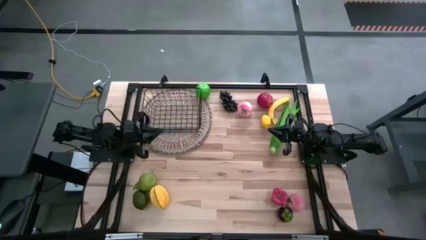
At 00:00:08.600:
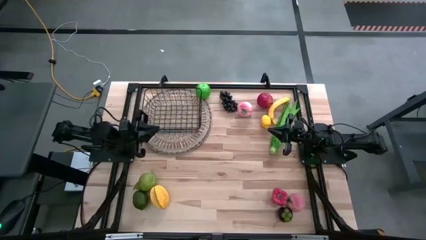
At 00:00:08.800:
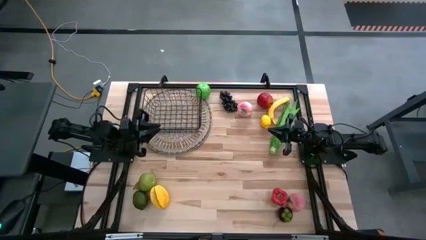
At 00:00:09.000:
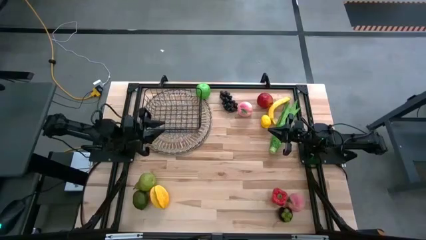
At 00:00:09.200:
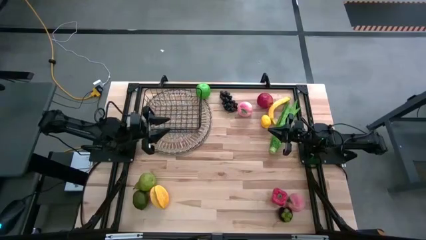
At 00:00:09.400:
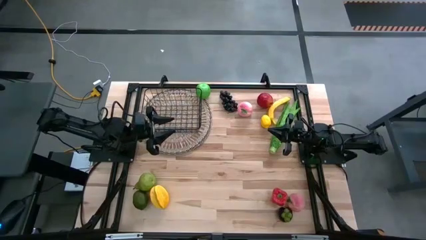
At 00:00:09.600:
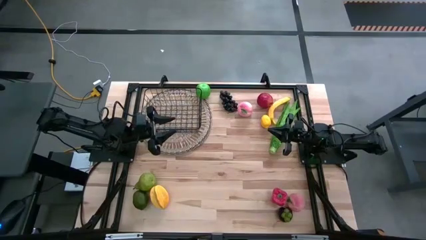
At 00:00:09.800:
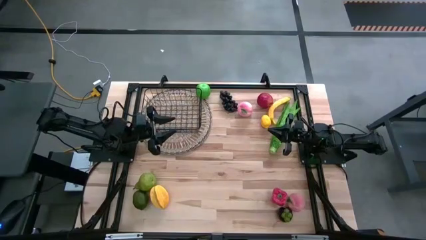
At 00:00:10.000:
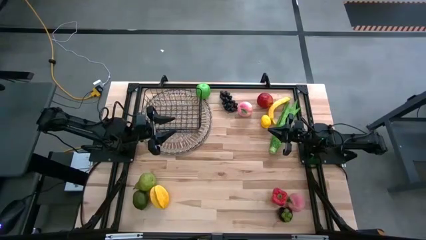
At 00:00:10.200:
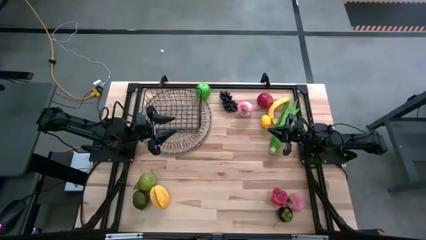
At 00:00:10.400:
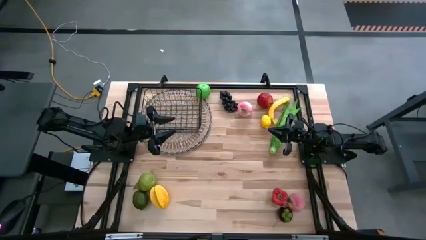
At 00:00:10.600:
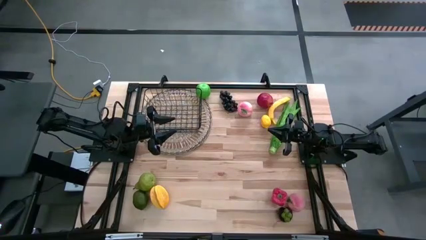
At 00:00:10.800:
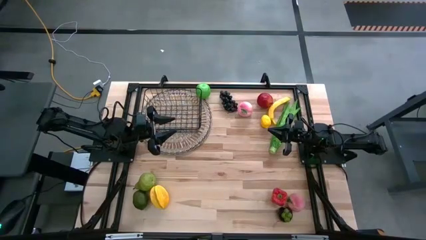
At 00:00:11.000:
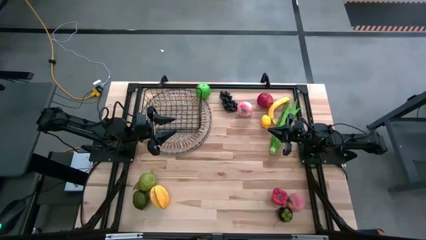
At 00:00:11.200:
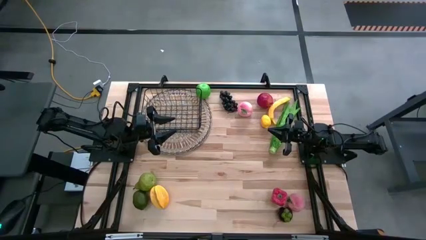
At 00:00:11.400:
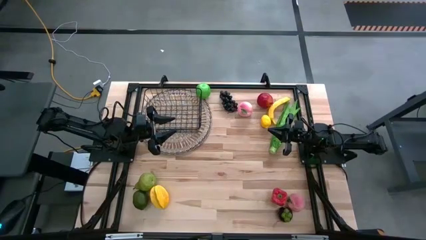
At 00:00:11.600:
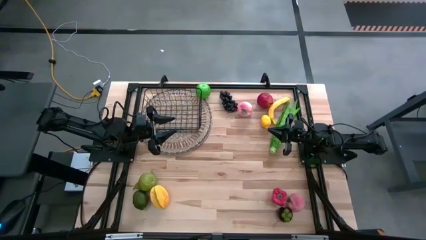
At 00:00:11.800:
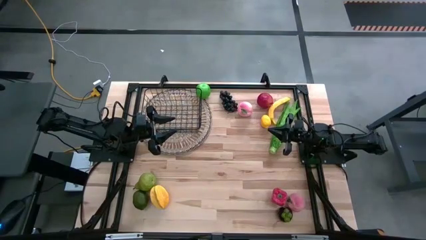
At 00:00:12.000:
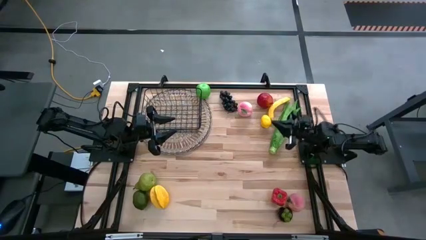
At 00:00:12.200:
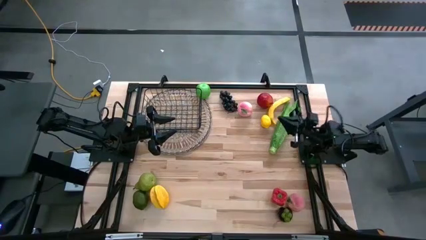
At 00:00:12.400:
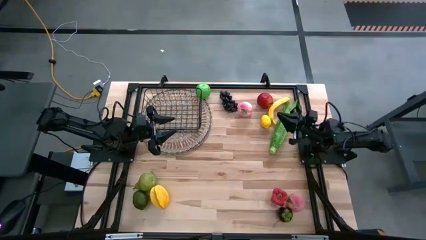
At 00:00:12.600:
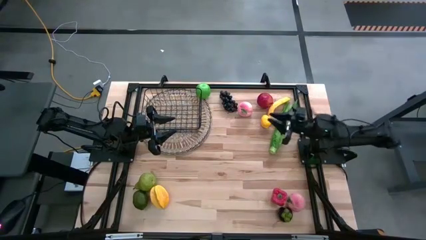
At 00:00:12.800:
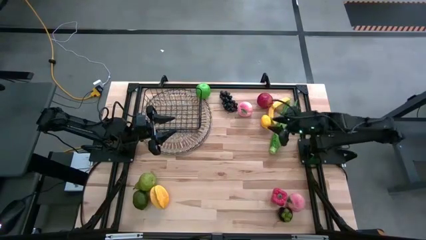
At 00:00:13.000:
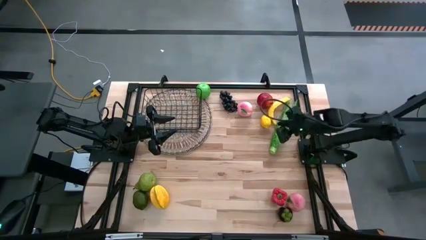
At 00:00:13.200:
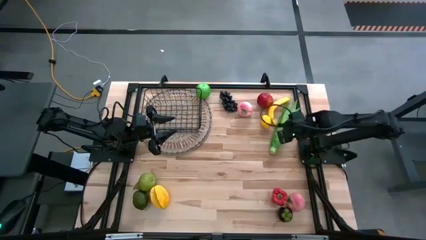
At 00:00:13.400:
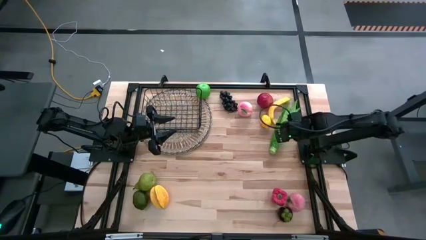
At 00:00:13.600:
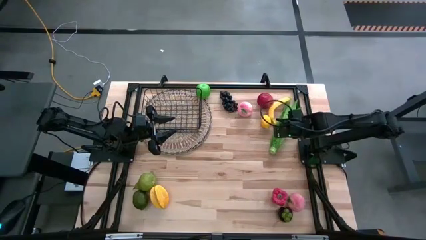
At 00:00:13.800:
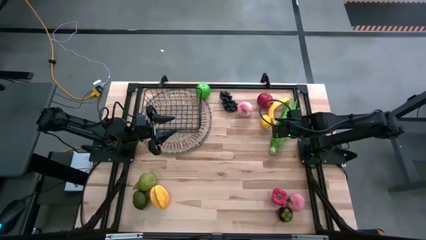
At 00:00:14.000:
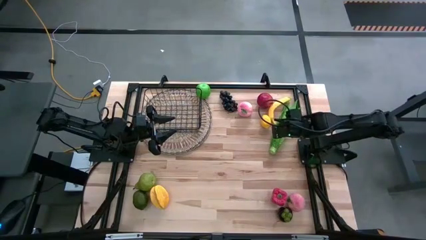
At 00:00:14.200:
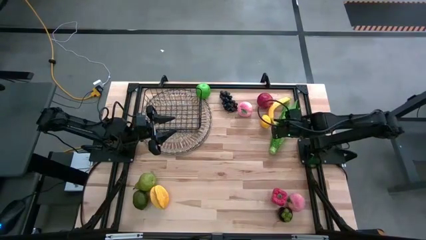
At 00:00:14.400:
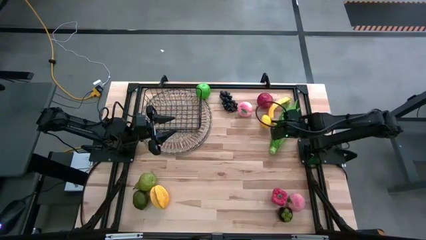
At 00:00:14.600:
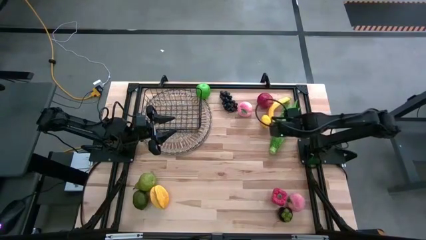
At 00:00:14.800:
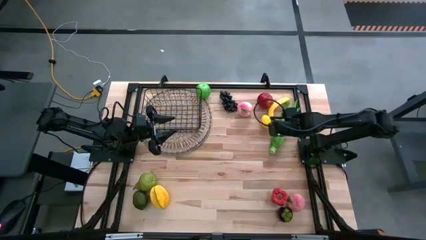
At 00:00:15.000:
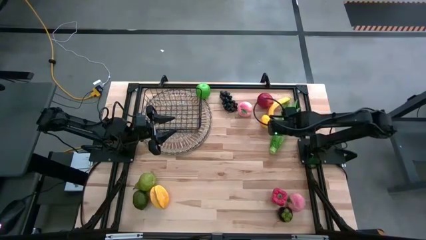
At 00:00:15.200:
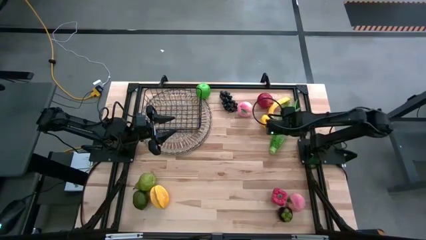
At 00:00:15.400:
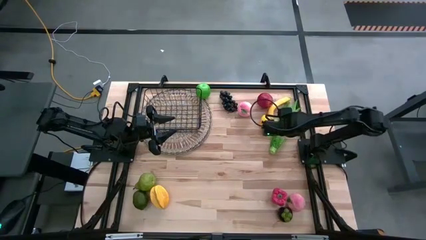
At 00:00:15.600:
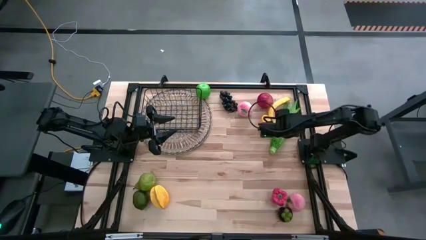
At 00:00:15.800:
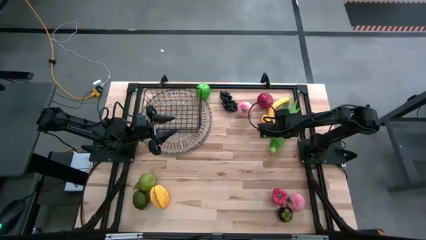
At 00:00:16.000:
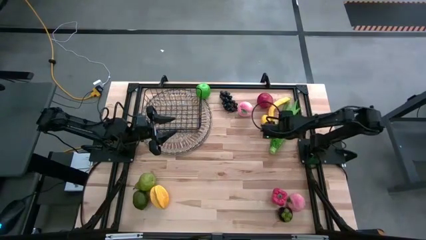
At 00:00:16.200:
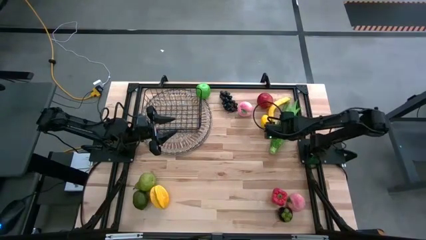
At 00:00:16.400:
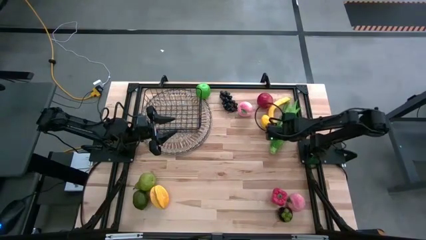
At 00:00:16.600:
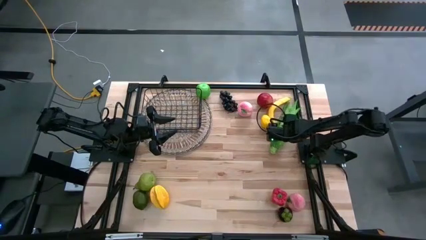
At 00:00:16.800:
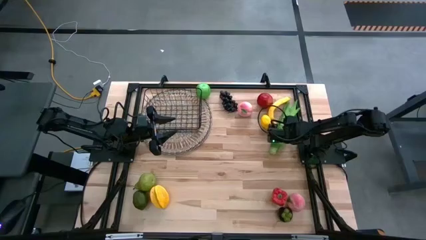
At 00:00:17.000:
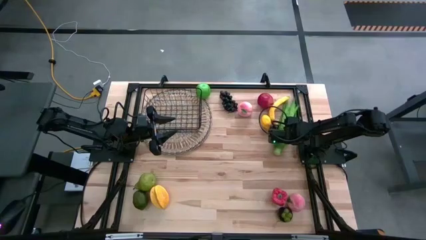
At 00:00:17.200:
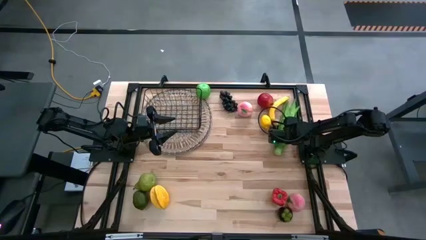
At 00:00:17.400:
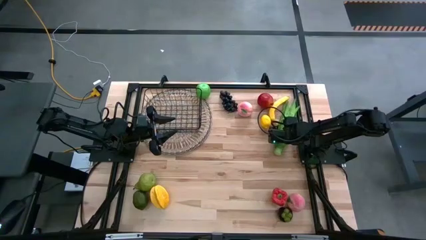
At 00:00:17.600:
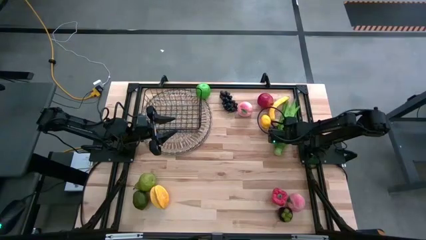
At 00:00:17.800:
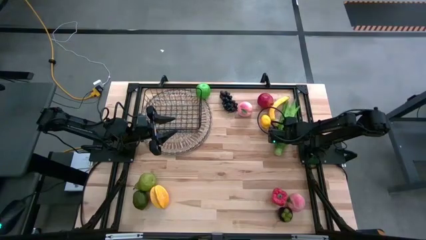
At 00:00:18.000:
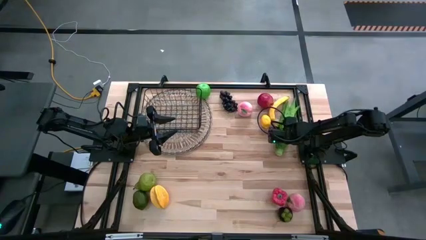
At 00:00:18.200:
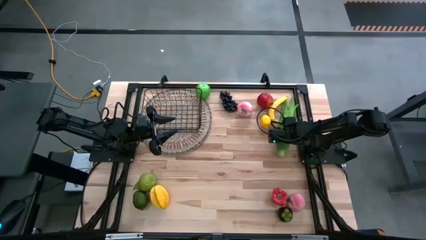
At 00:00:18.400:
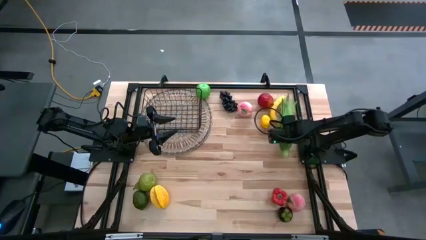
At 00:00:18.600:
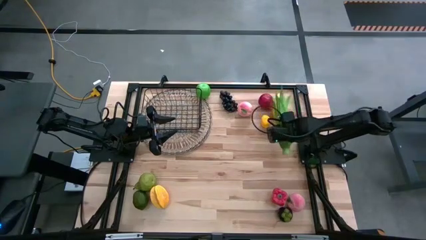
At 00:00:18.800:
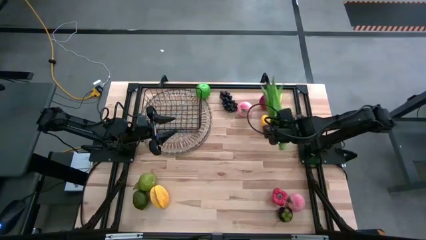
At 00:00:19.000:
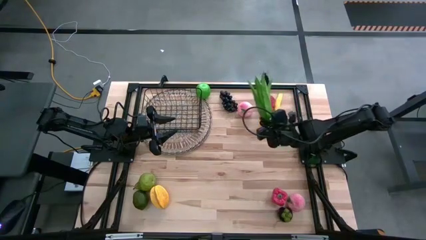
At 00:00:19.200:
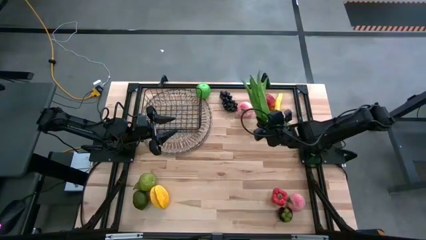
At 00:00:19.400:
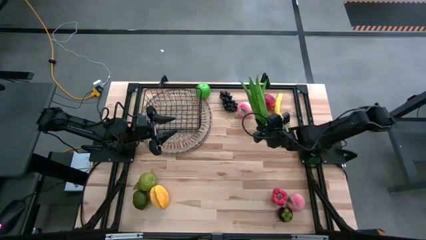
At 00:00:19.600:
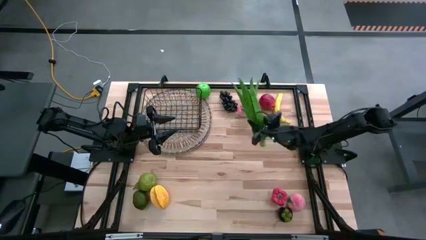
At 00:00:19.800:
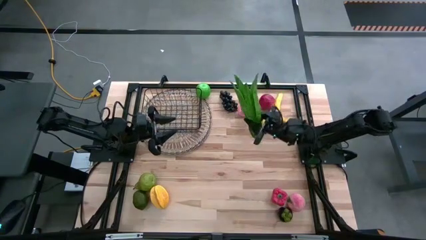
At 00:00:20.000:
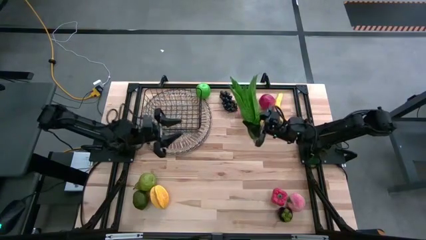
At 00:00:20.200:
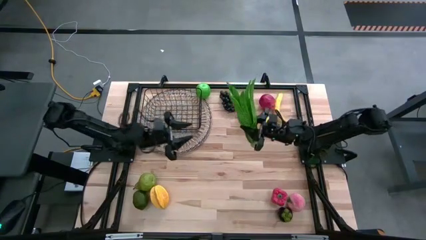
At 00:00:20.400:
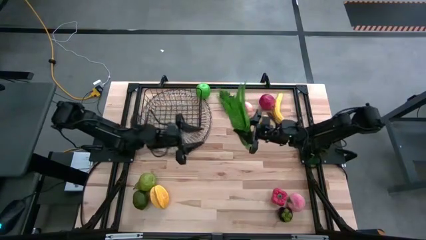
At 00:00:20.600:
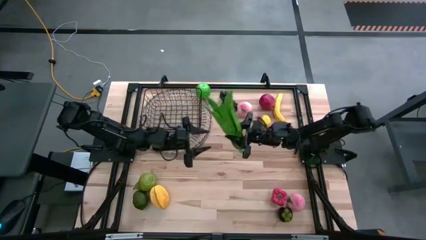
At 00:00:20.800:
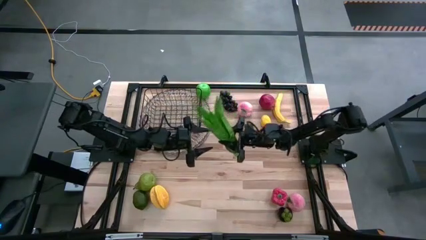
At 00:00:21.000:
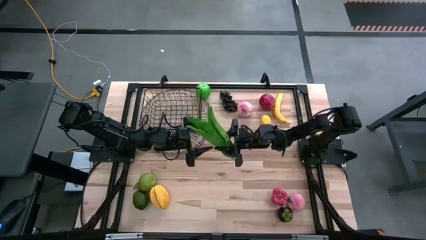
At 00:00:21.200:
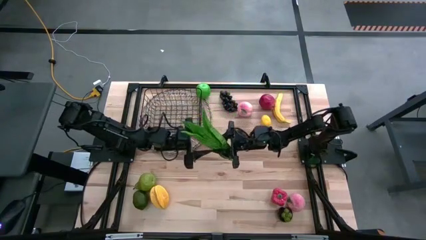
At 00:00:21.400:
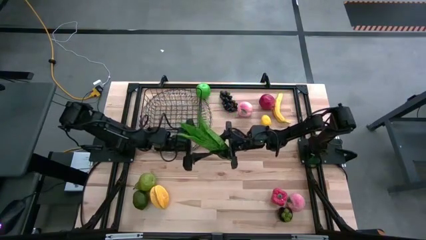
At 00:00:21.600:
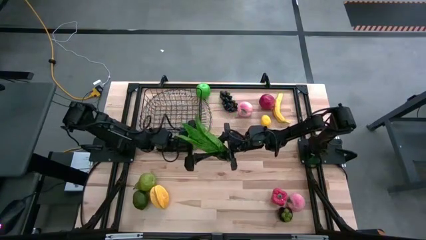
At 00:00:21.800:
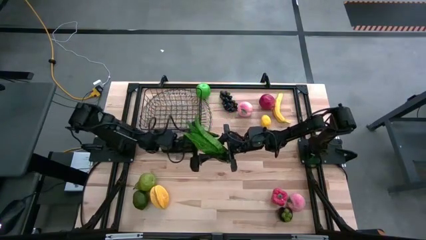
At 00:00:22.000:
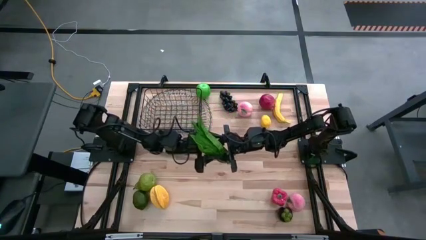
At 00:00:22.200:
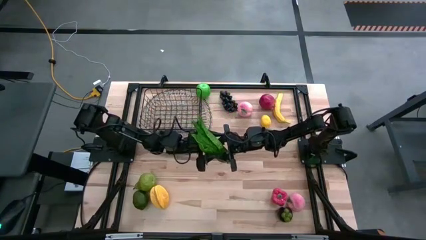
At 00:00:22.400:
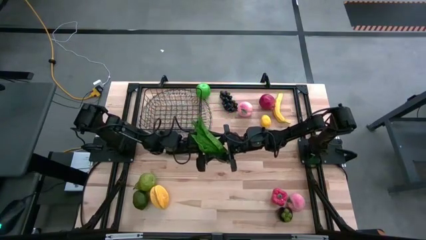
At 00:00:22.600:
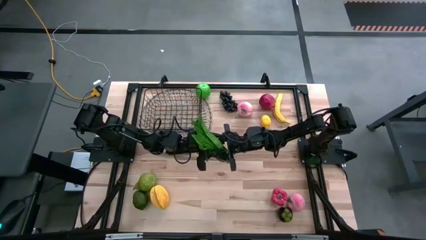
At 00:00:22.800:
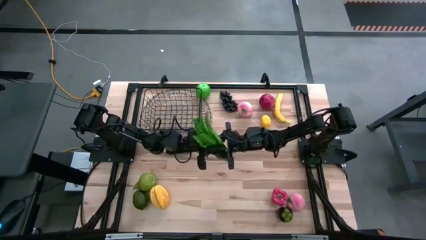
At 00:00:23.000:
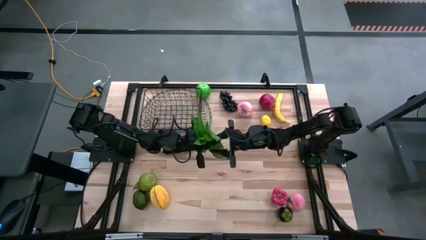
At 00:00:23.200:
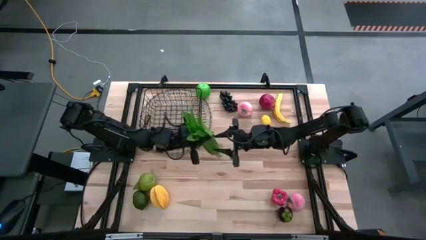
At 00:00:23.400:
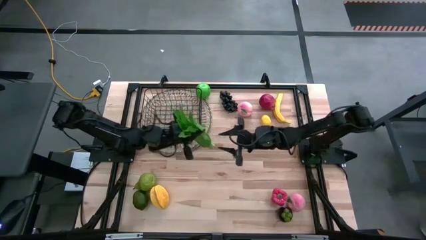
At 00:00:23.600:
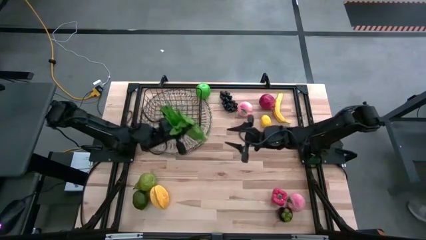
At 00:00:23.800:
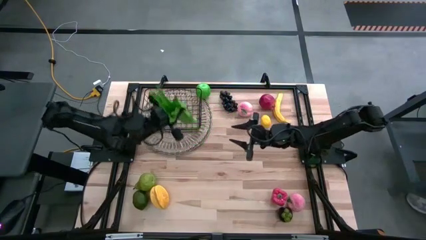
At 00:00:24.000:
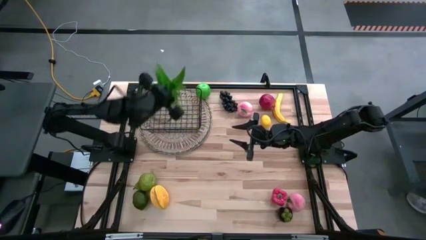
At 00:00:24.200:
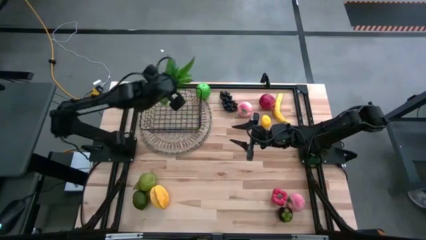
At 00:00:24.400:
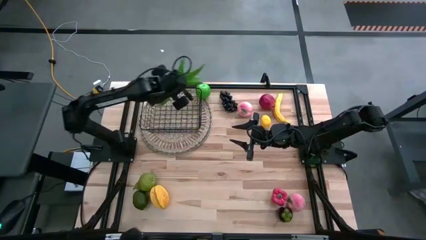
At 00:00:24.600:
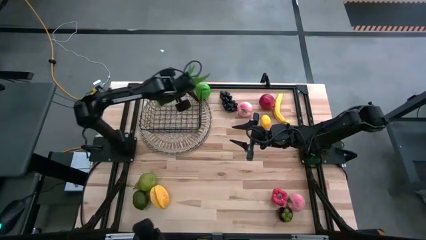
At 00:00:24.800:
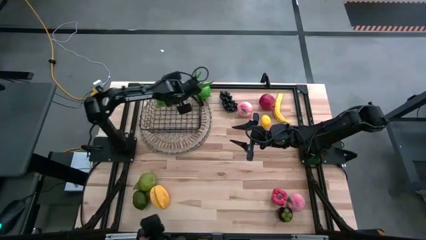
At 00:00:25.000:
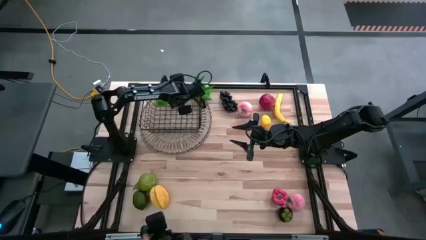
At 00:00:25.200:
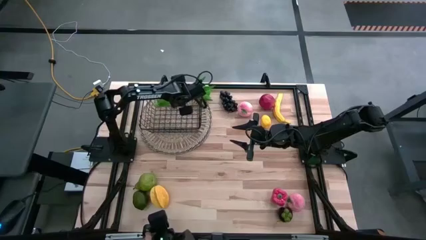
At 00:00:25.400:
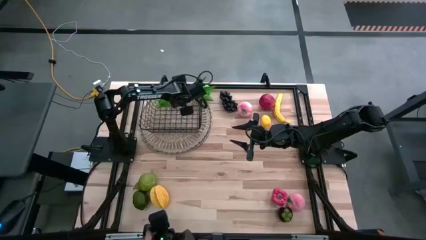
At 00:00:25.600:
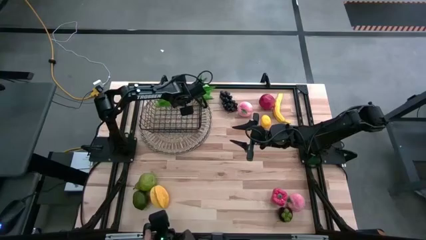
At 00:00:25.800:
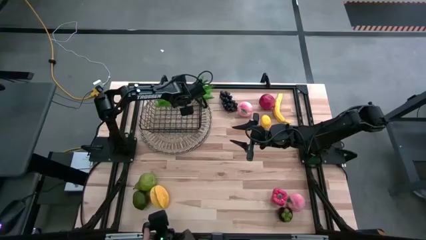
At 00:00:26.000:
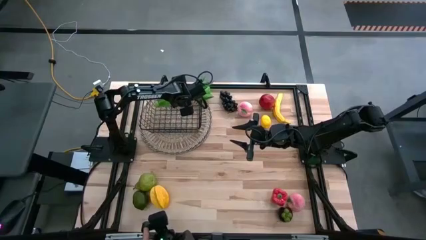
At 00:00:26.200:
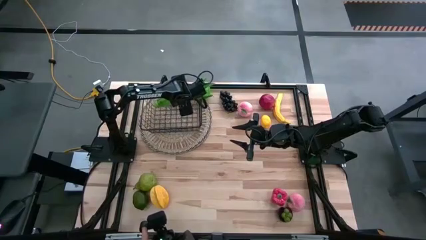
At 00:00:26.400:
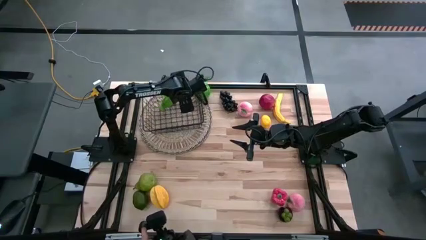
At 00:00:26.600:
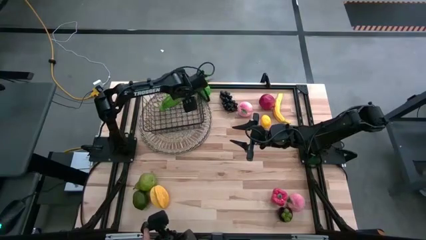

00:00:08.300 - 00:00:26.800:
Task: Build produce basket
Put the green leaf lettuce into the wire basket
